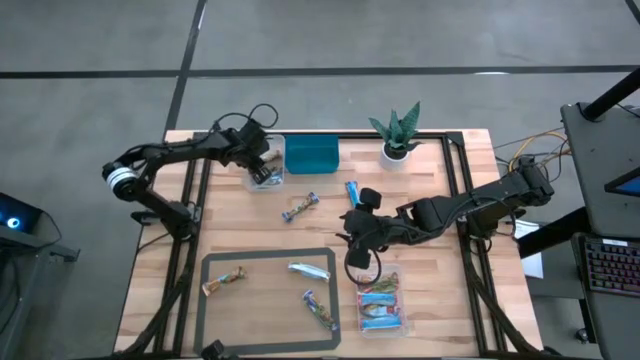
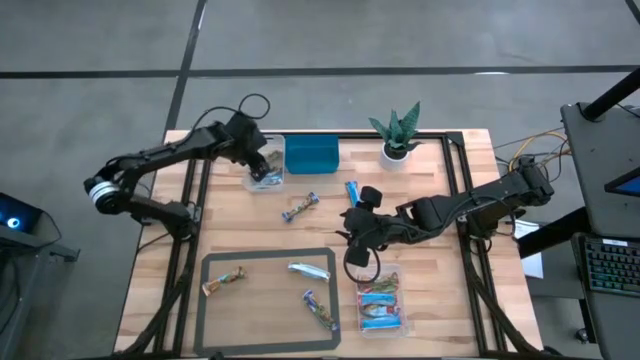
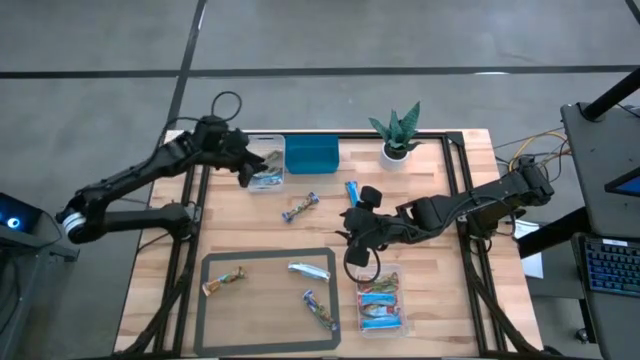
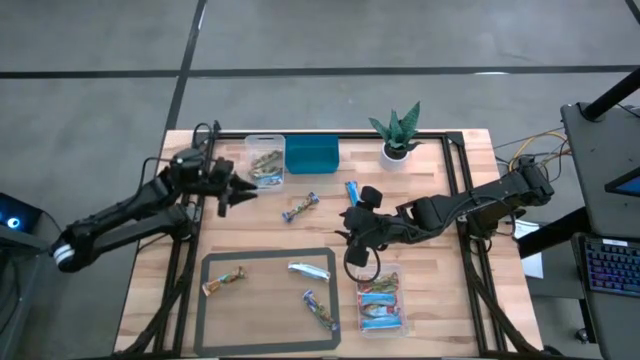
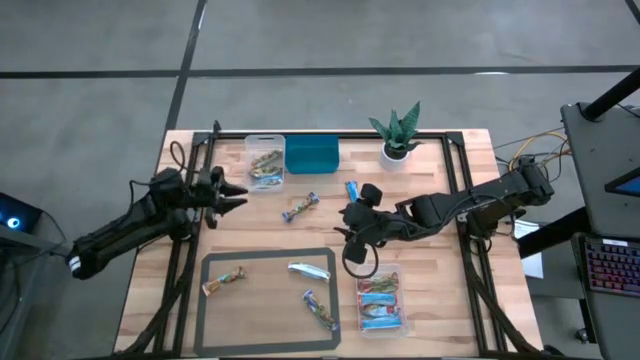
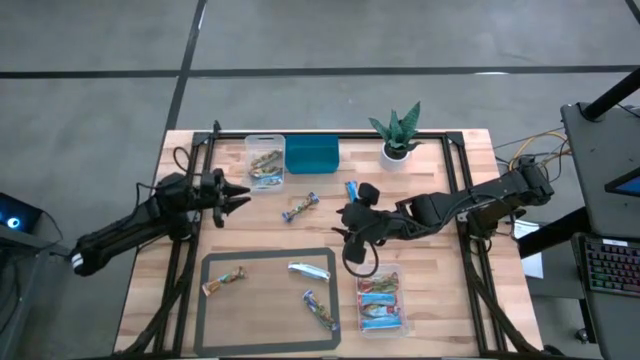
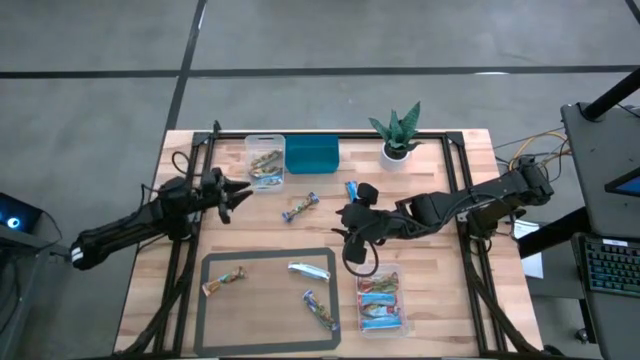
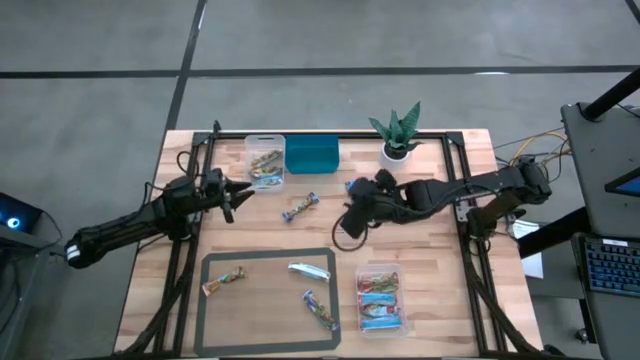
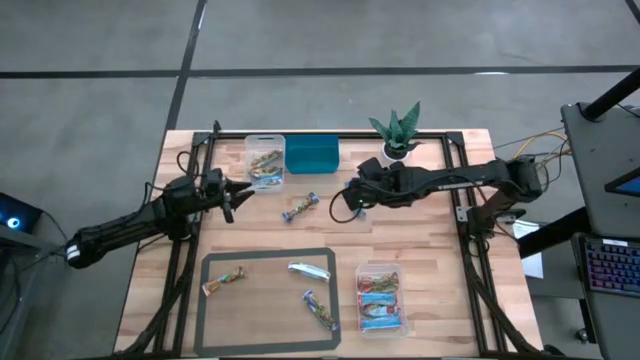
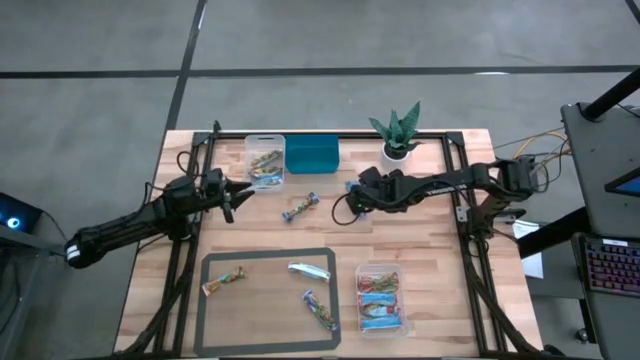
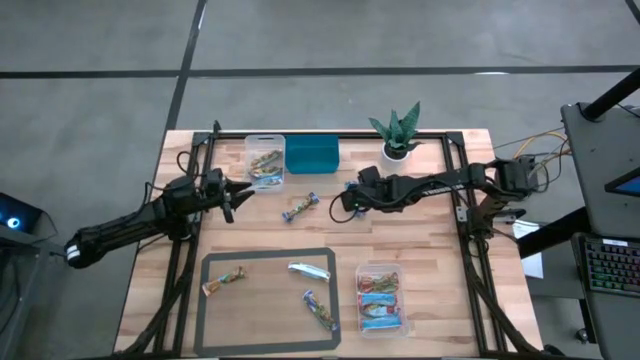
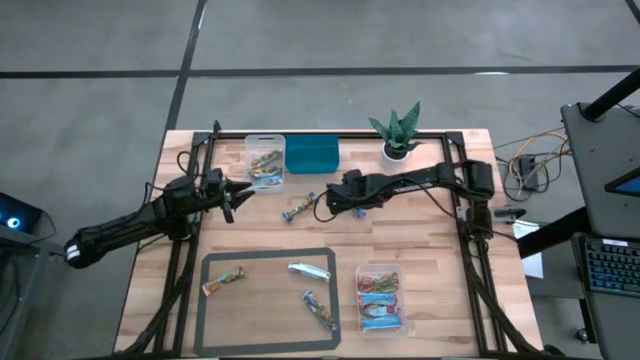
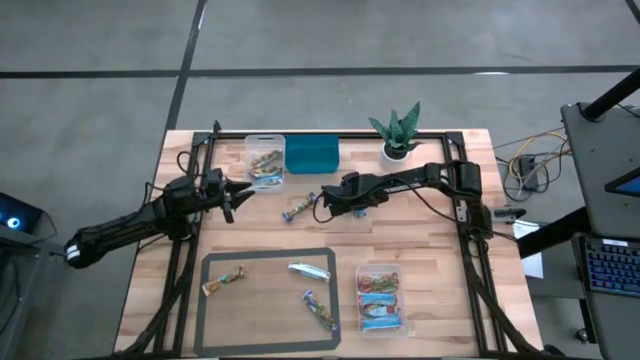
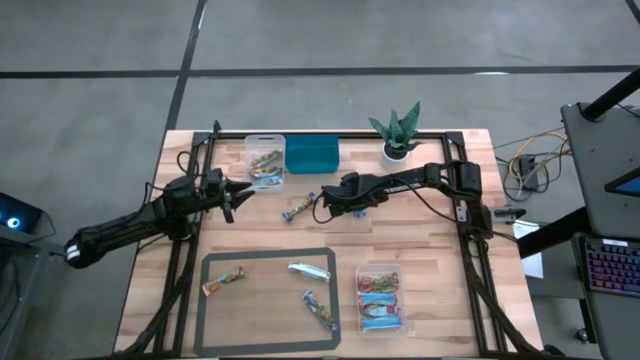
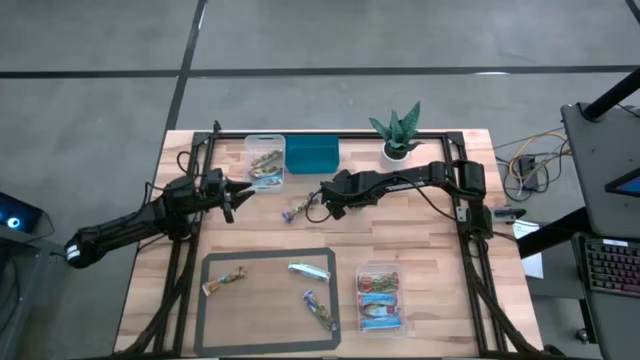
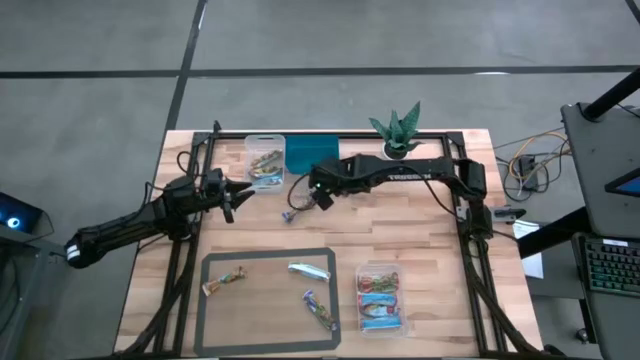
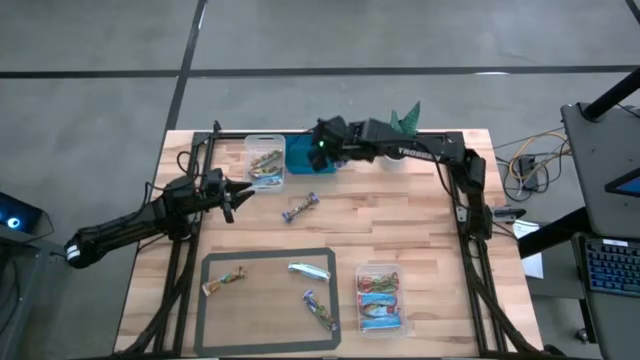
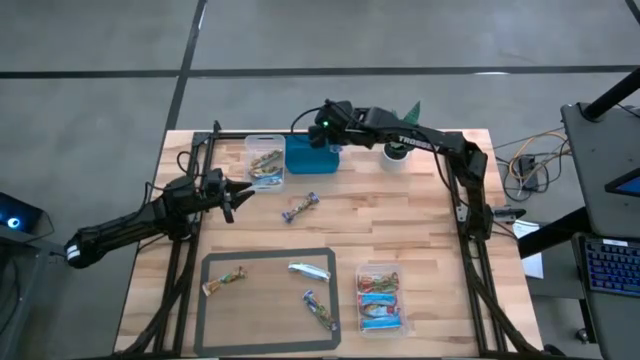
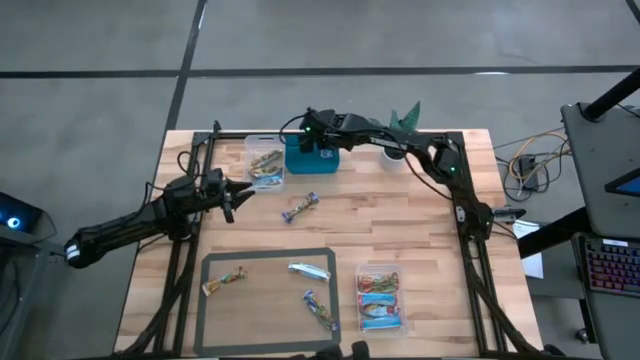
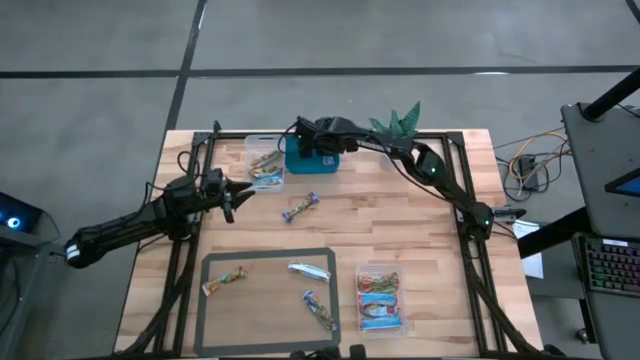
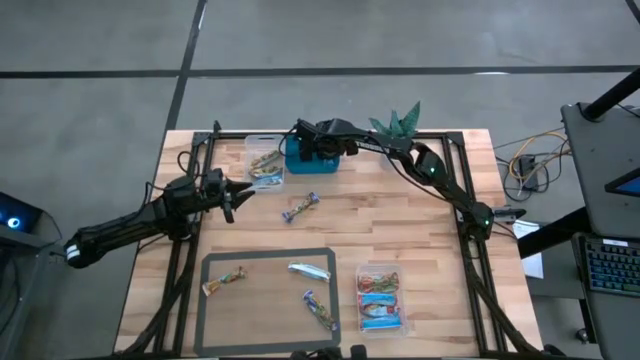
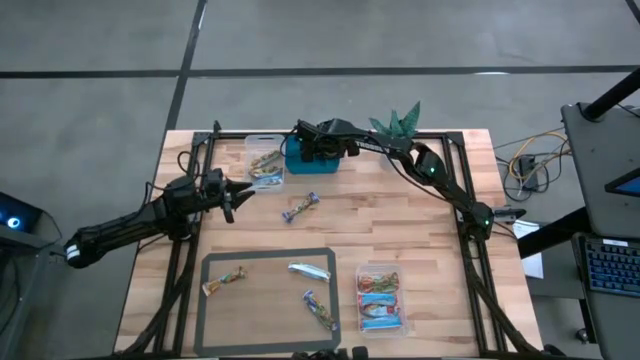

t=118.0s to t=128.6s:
Task: Pick and place Granola Bars by type
Put the blue granola bar into the blue bin

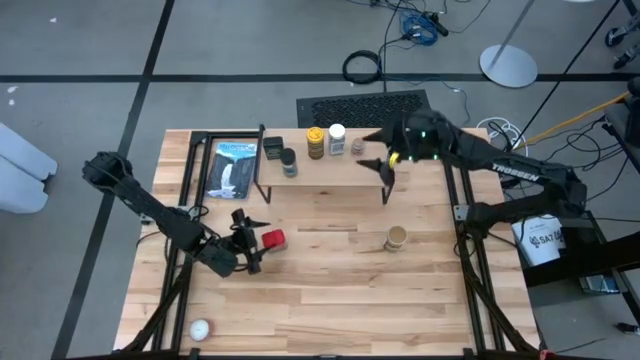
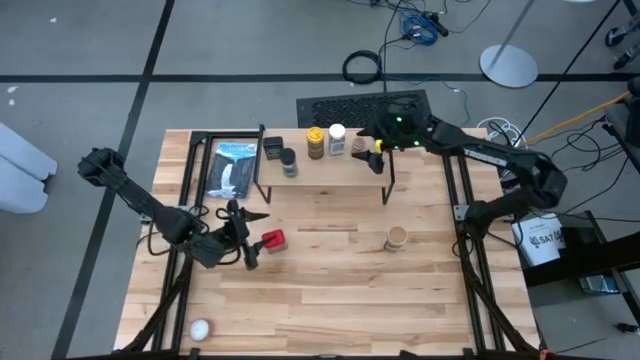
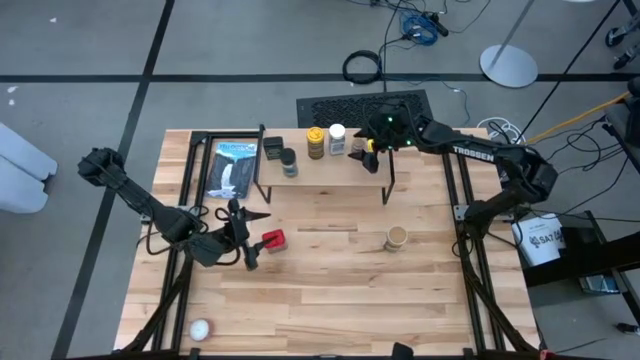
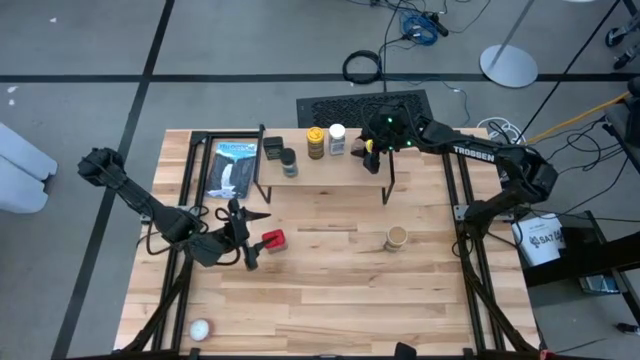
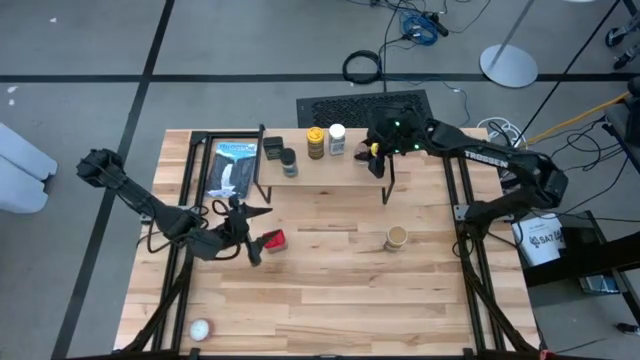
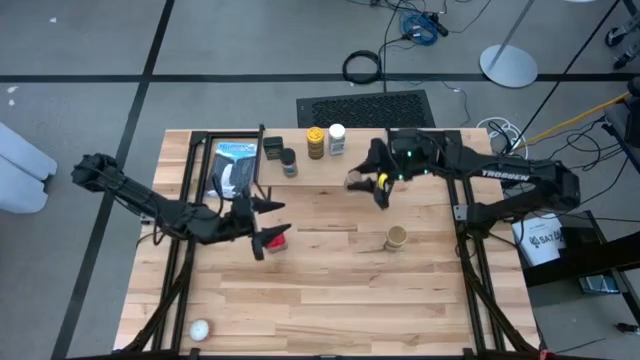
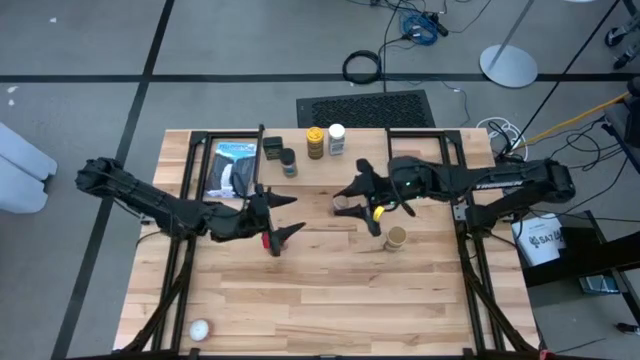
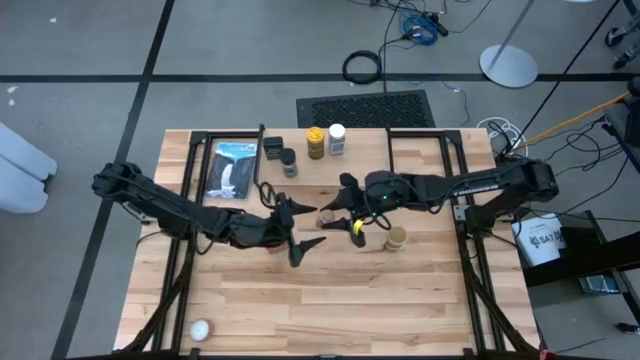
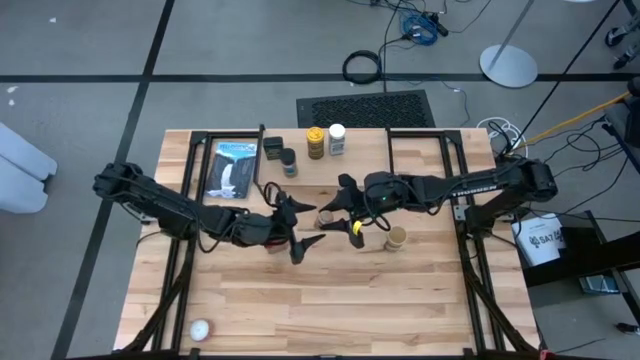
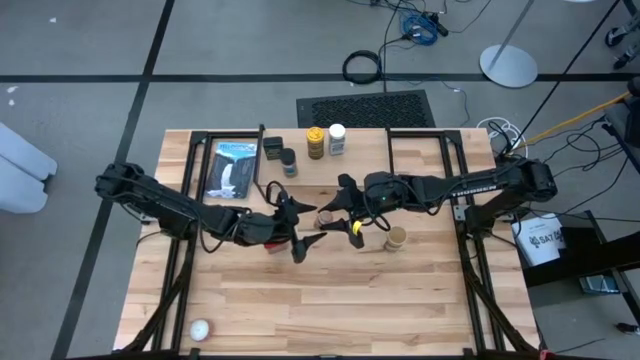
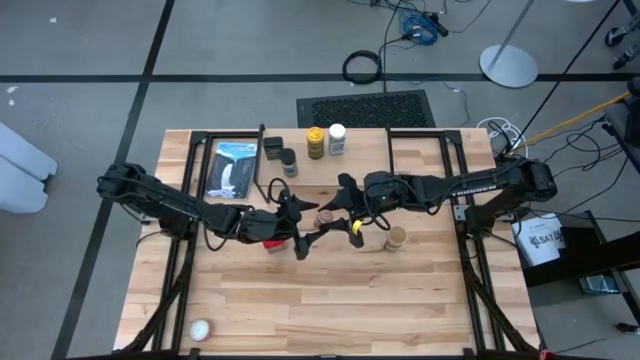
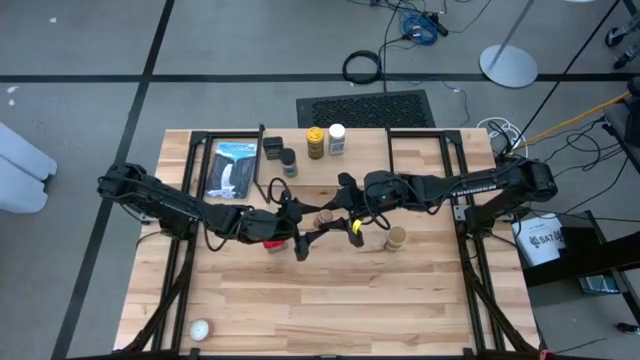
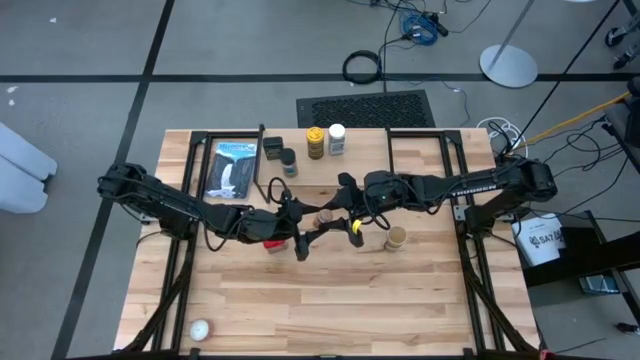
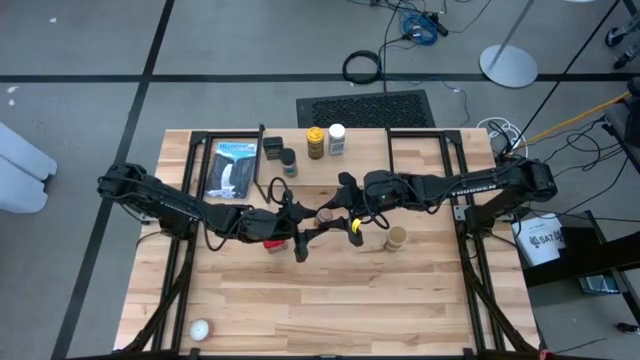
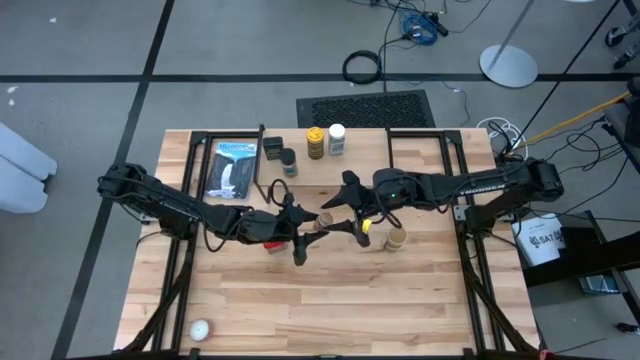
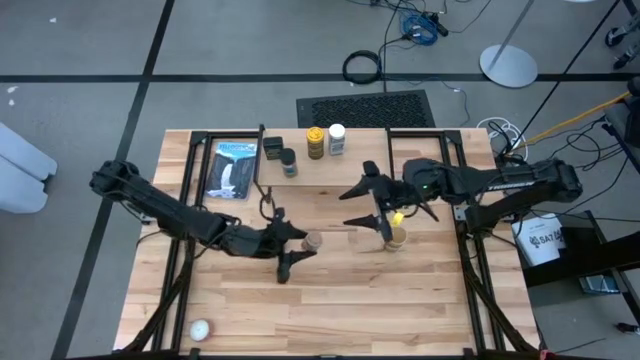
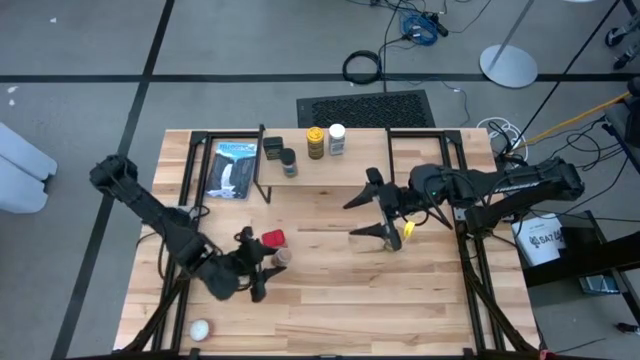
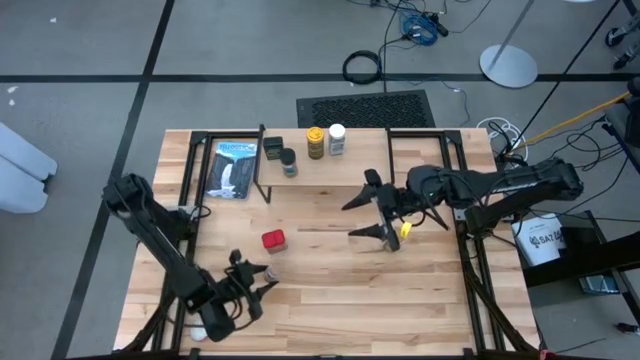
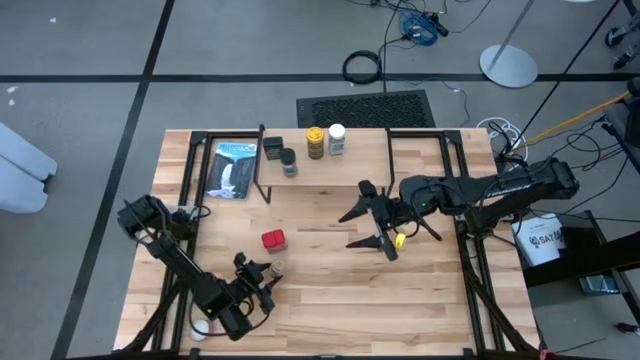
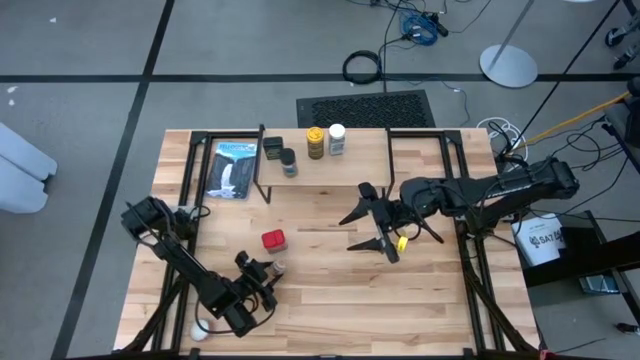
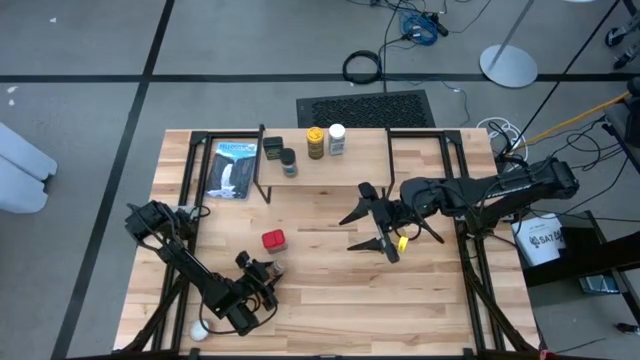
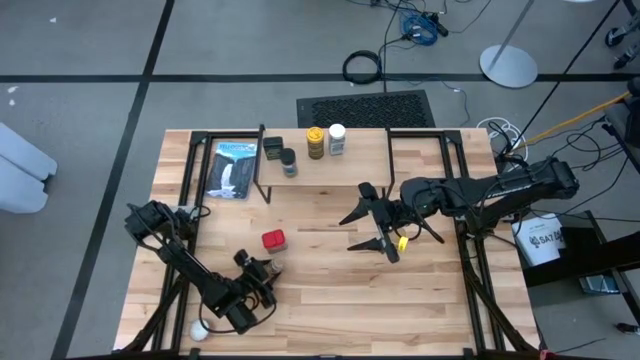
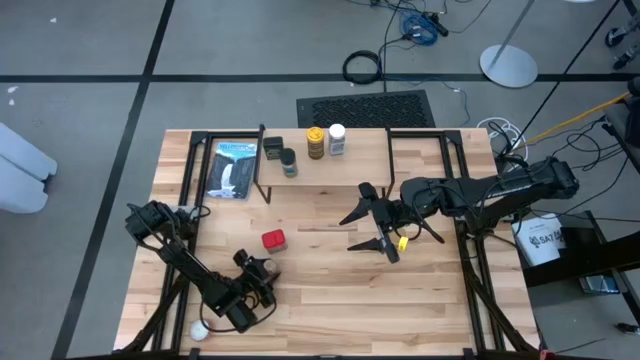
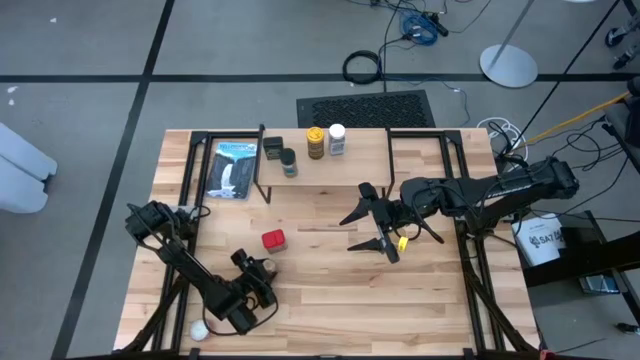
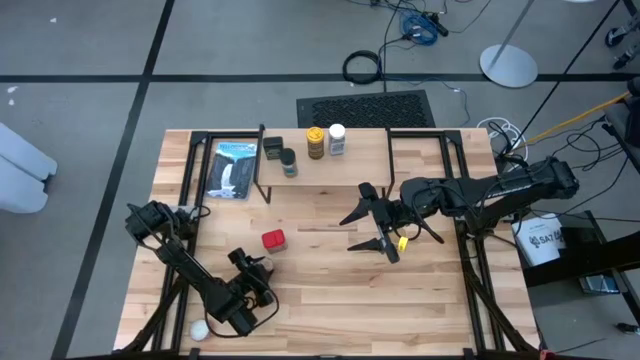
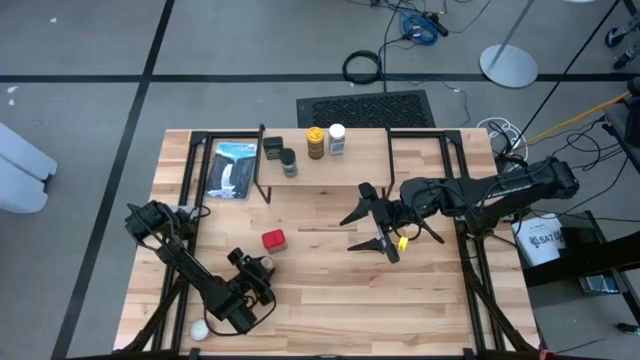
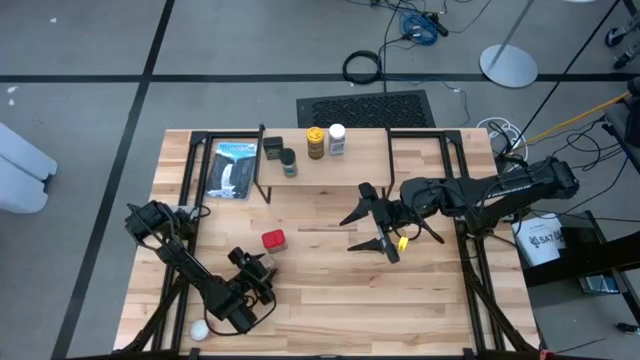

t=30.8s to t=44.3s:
Task: Shelf spices
Remove the brown seasoning bottle from the shelf
